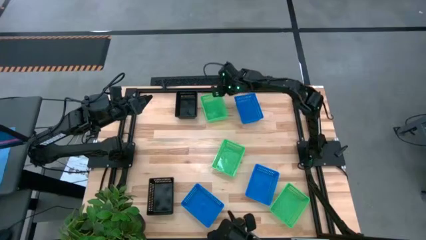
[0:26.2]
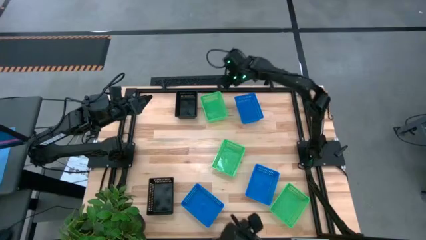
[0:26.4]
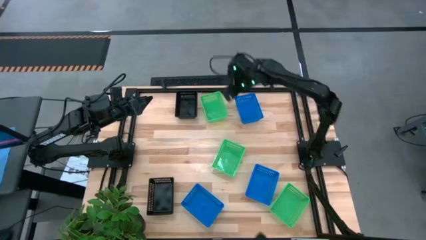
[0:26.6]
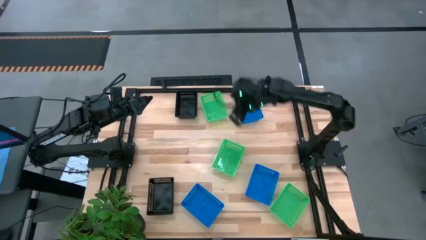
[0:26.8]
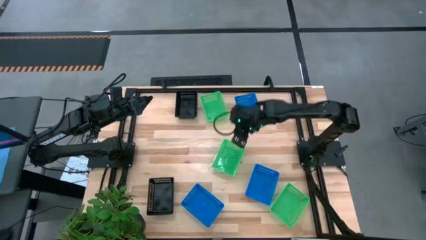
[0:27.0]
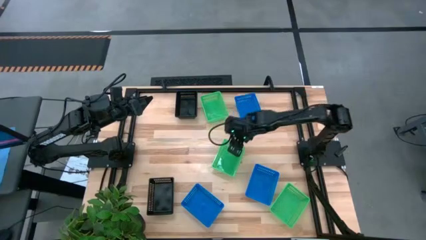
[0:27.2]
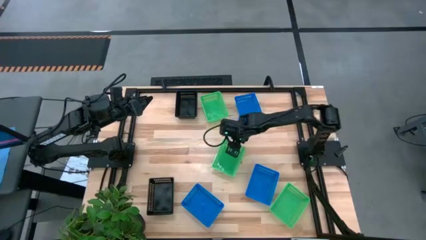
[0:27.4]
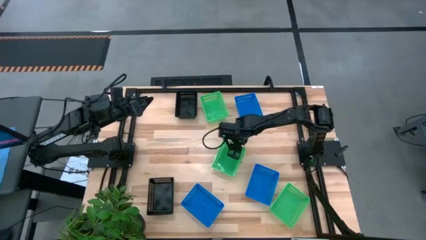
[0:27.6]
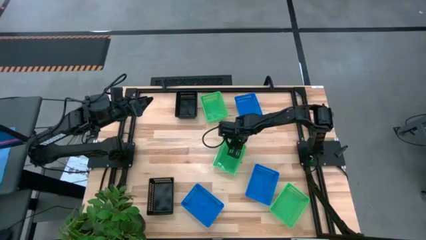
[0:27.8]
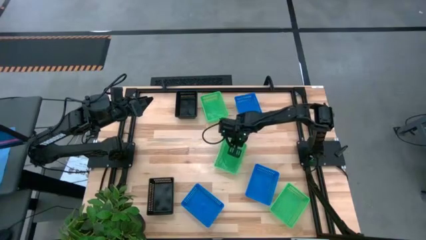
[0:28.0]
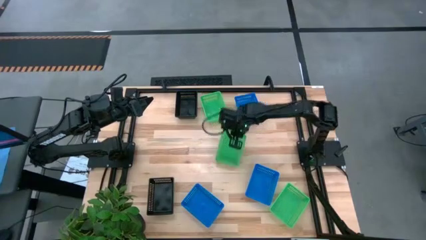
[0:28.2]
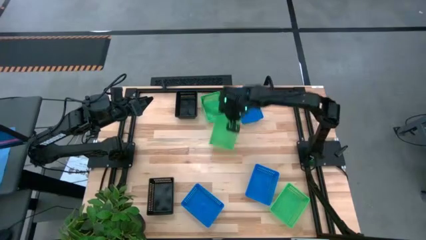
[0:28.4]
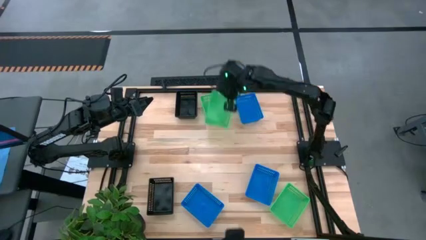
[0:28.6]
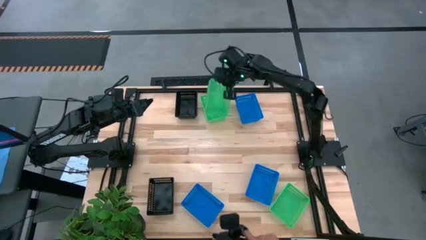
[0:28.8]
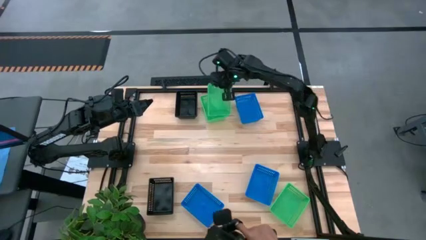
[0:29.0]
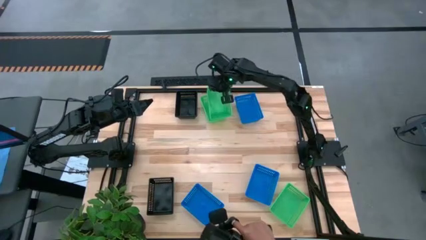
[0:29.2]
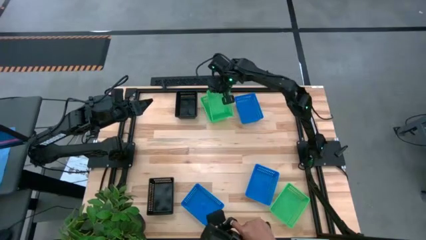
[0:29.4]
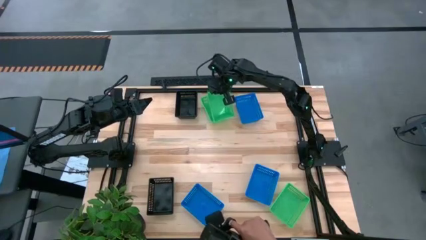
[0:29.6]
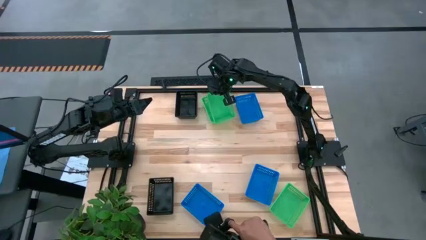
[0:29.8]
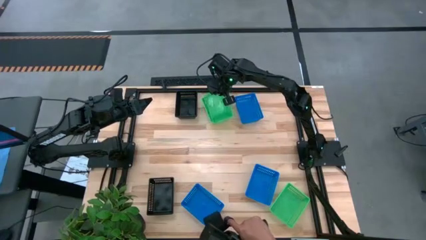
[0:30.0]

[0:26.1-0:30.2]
Stack the middle green bin on top of the top green bin

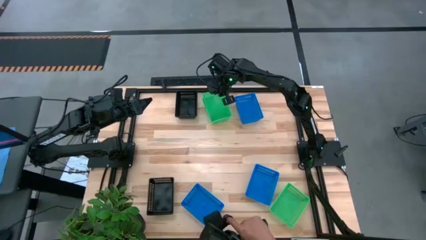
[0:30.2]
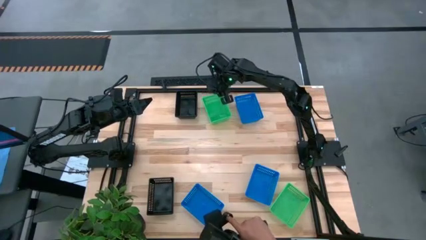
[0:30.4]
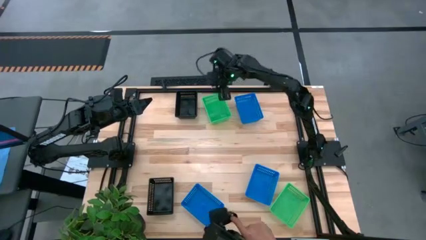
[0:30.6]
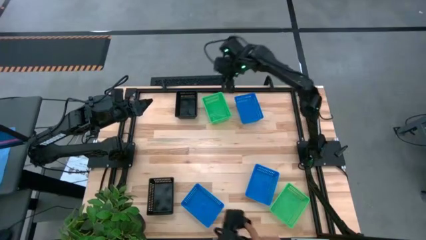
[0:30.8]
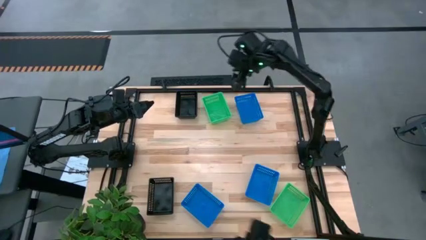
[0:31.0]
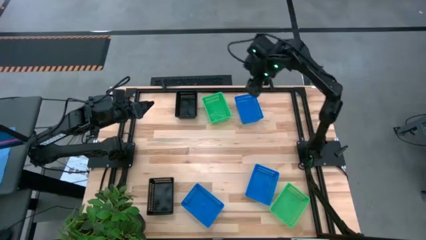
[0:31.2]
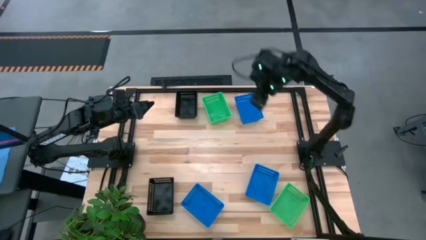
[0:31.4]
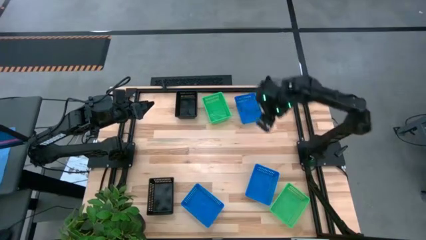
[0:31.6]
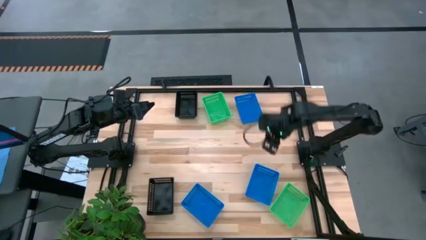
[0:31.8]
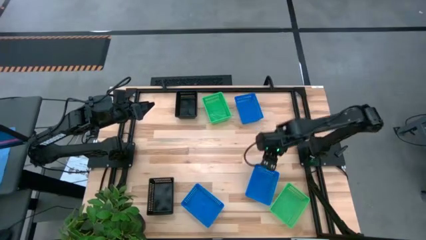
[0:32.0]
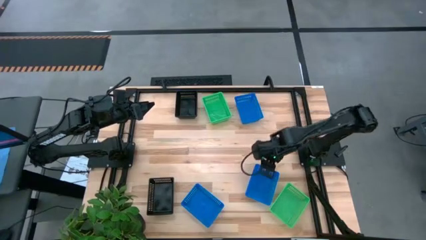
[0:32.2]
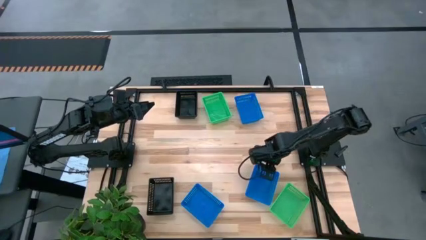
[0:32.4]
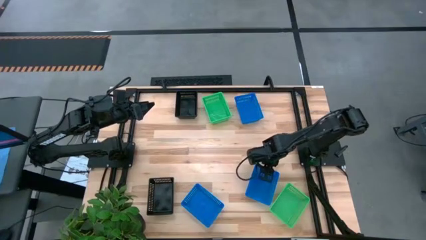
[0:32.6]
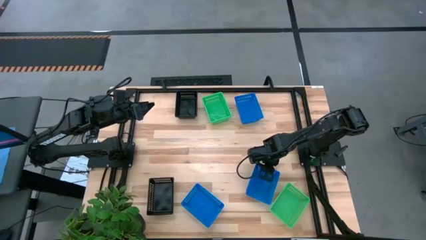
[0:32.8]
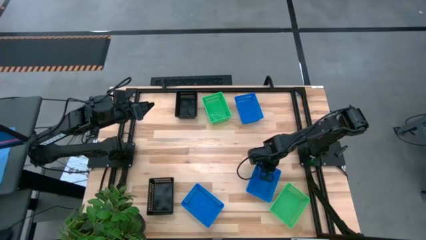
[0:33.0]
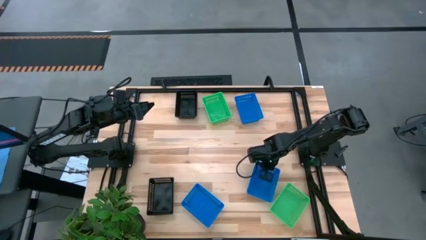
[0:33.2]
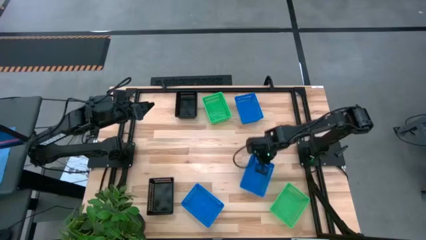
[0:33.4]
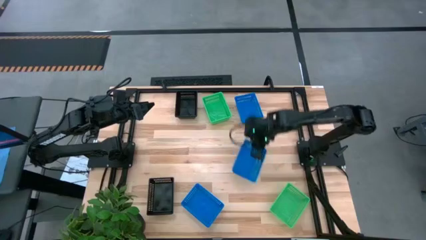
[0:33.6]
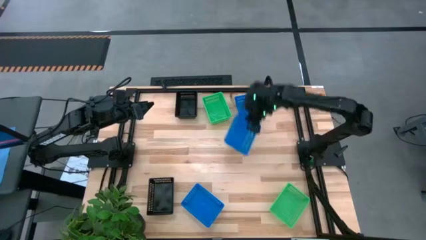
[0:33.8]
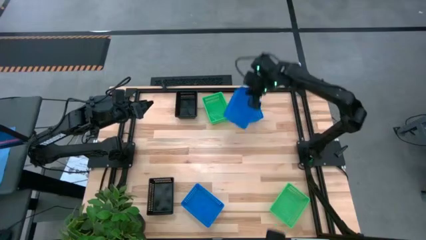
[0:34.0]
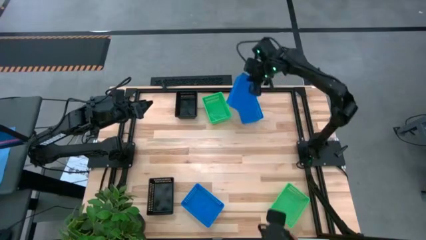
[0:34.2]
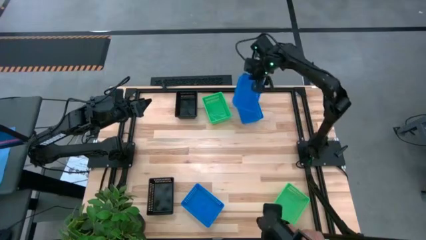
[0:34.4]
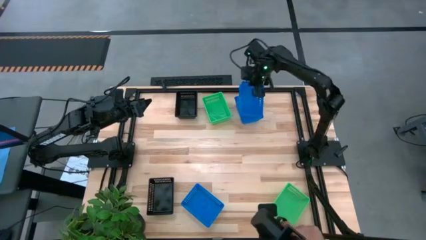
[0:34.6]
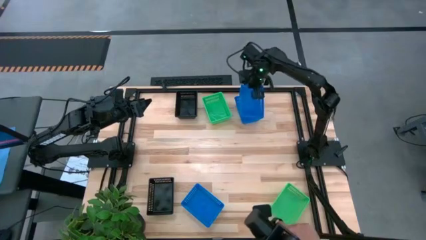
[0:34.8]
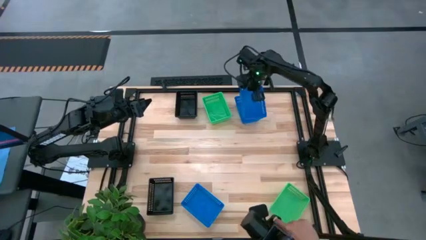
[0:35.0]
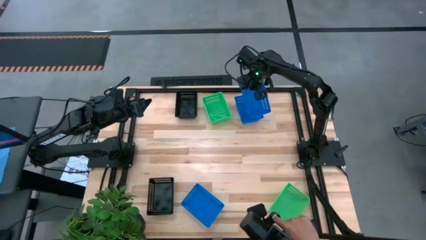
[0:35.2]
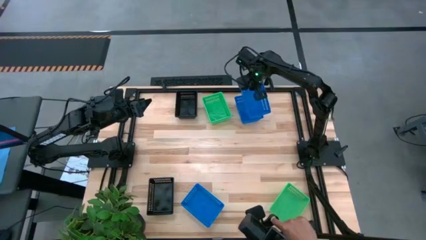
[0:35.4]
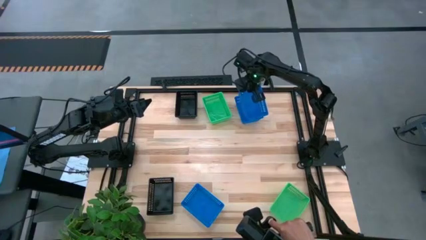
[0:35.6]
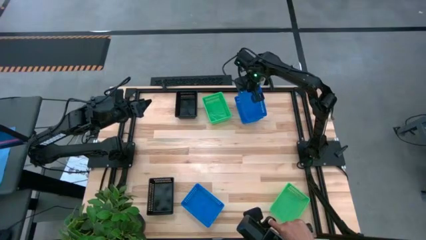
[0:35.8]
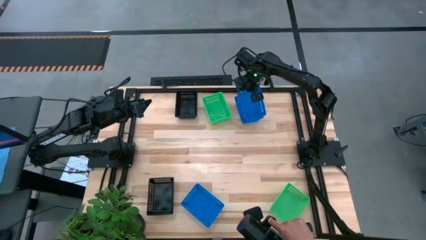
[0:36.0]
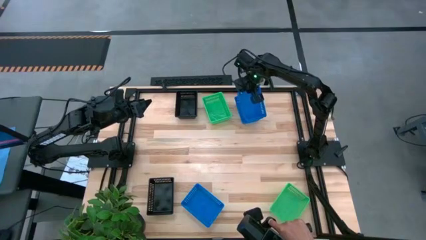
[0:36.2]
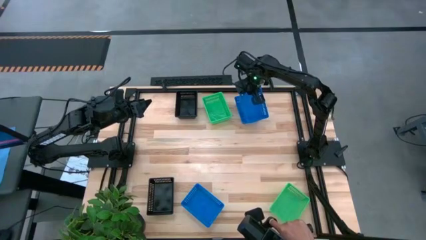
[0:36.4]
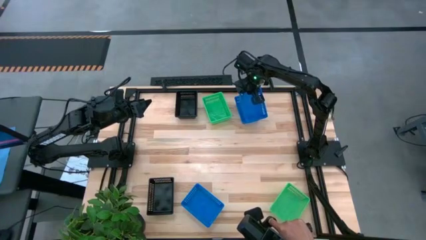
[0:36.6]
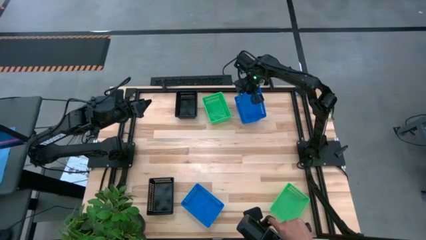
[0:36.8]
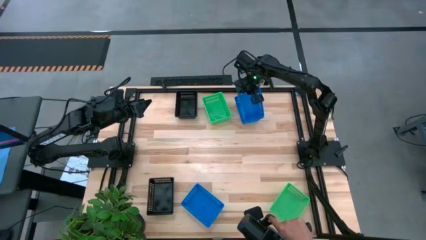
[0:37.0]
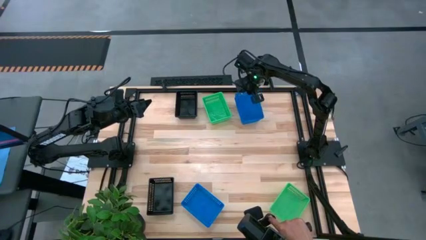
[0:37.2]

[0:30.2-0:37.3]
Stack the bottom right blue bin on top of the top blue bin

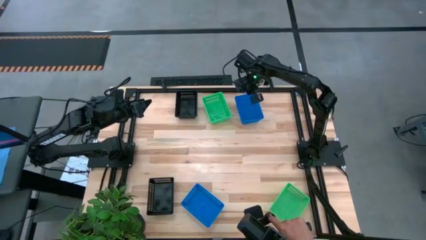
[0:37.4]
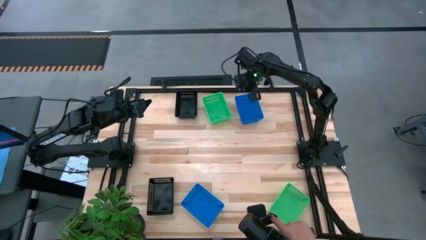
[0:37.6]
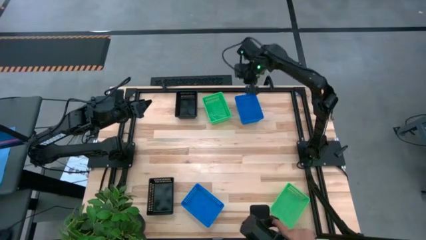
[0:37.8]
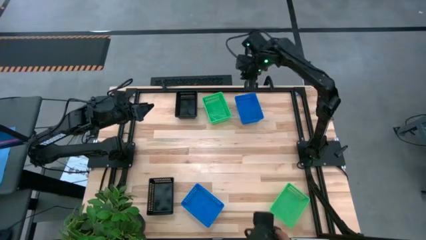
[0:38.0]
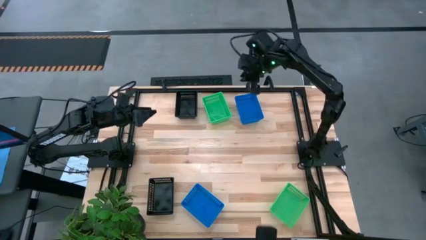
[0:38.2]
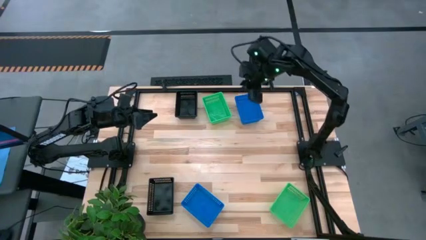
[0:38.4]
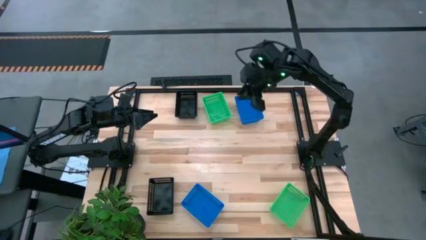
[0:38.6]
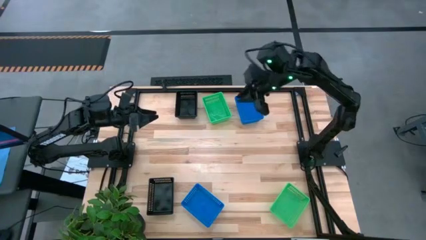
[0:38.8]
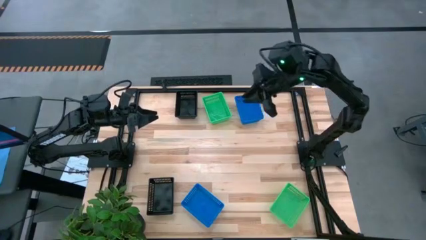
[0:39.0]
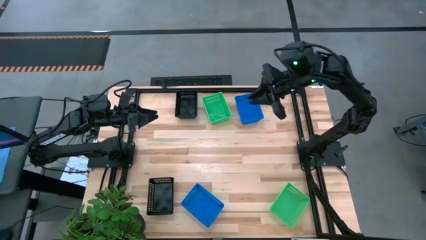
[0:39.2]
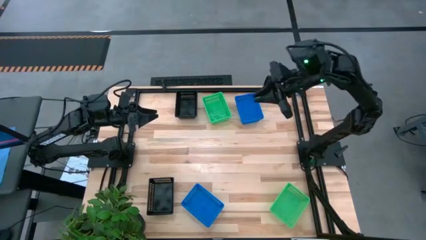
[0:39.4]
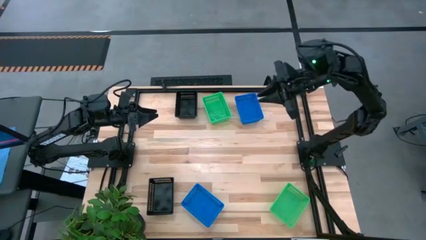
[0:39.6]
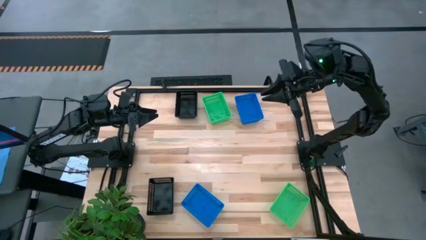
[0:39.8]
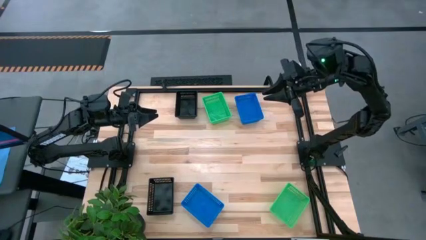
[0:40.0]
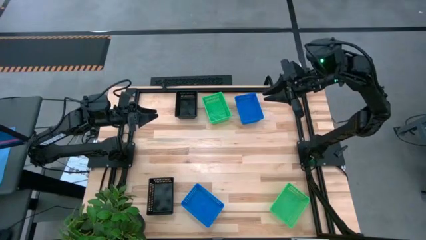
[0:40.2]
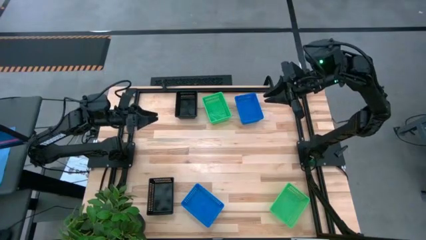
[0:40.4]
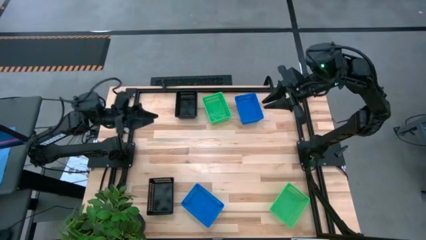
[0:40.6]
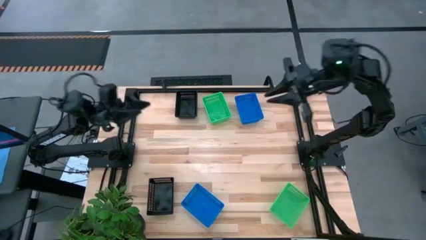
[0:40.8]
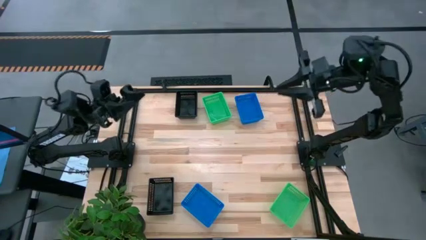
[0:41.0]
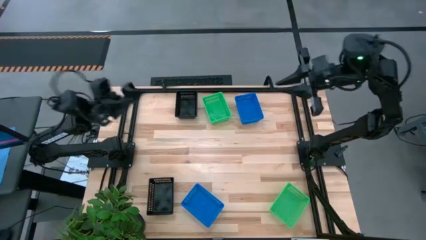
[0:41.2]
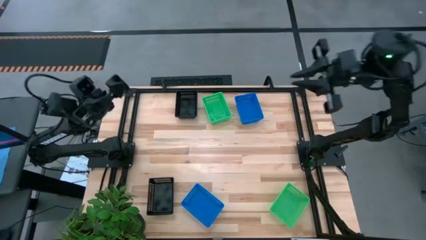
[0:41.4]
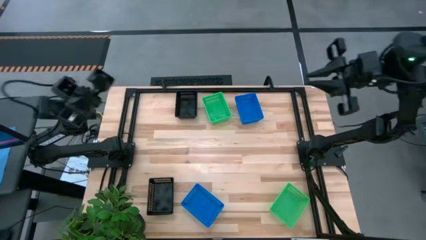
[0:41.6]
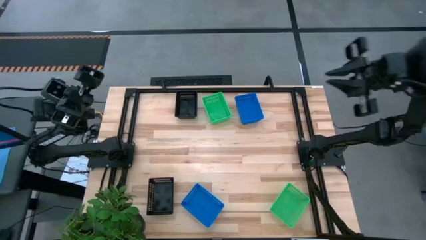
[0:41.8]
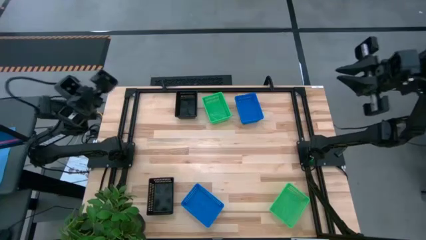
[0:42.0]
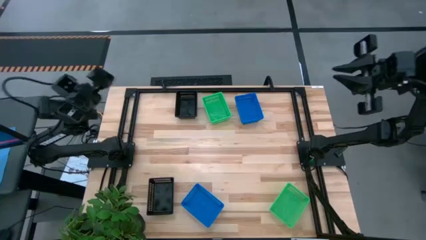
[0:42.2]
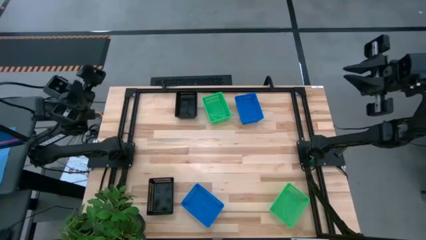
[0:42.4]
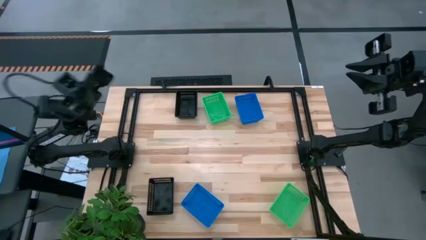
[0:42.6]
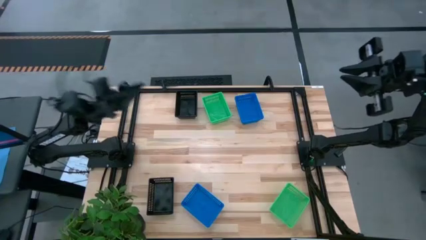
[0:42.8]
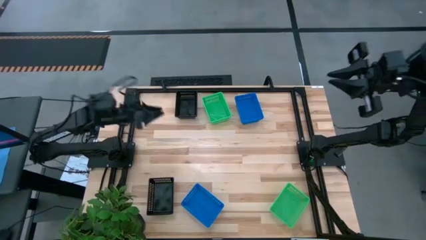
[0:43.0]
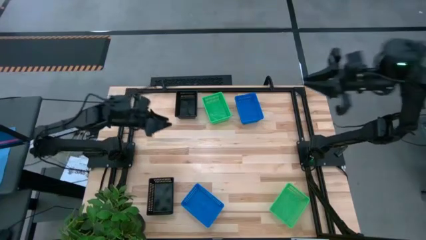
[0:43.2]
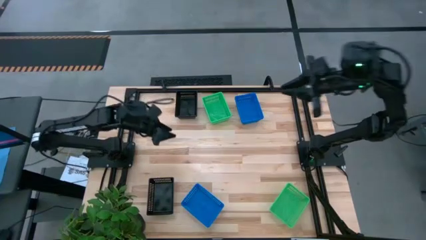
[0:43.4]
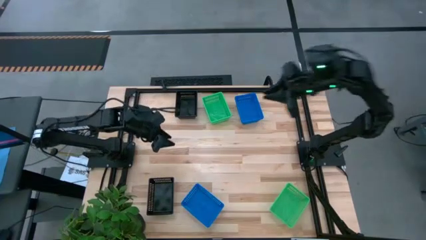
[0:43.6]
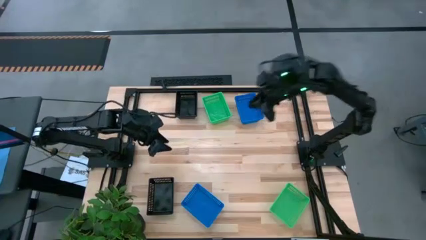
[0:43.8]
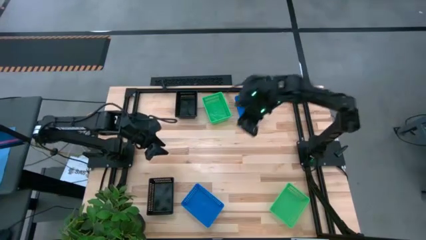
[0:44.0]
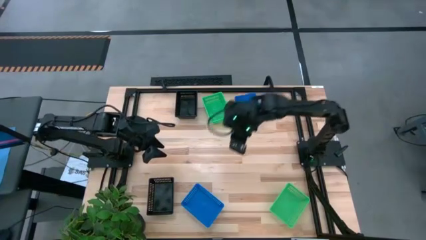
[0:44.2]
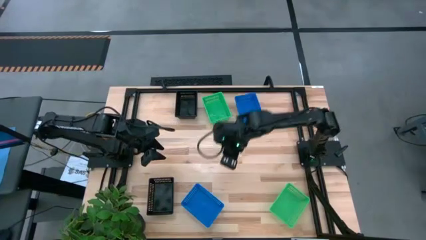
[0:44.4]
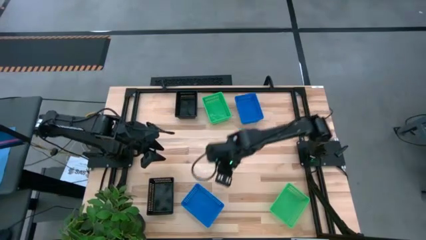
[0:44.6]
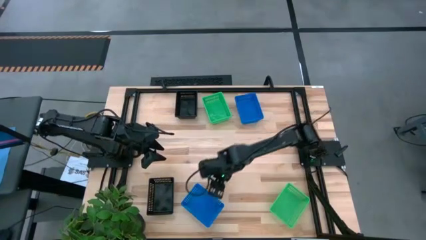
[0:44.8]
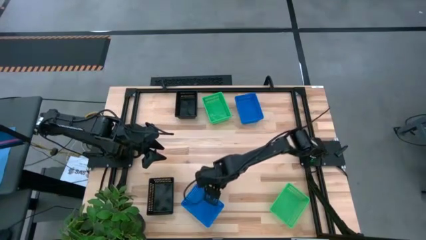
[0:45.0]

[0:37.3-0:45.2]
Stack the bottom blue bin on top of the top blue bins
